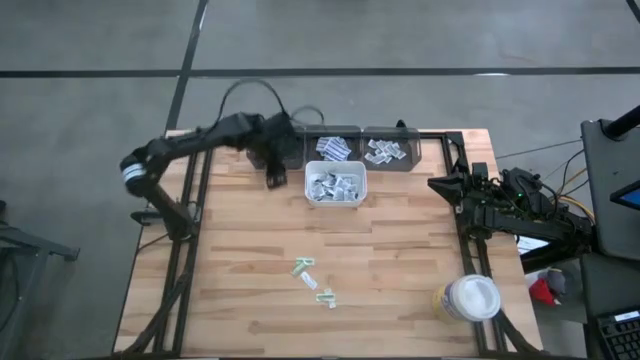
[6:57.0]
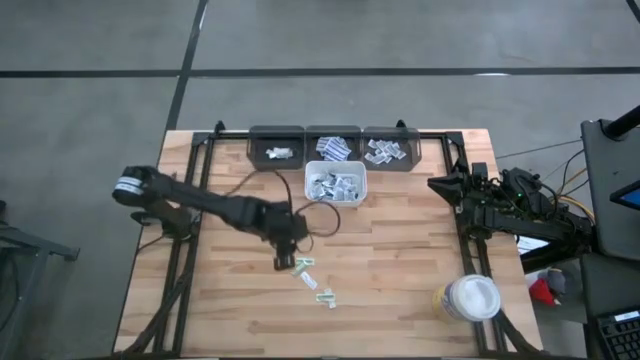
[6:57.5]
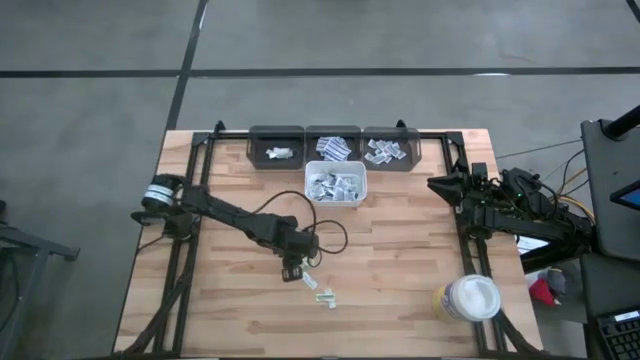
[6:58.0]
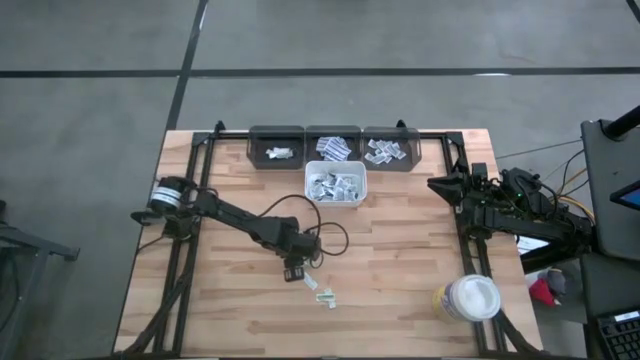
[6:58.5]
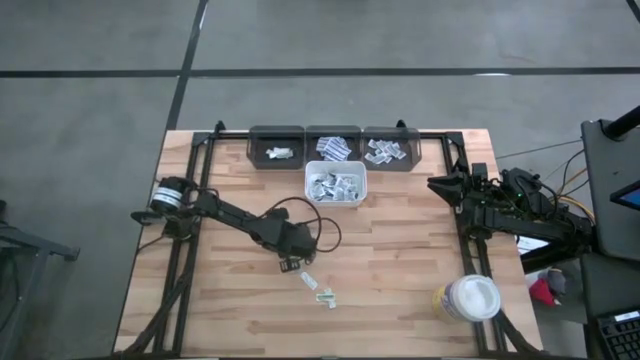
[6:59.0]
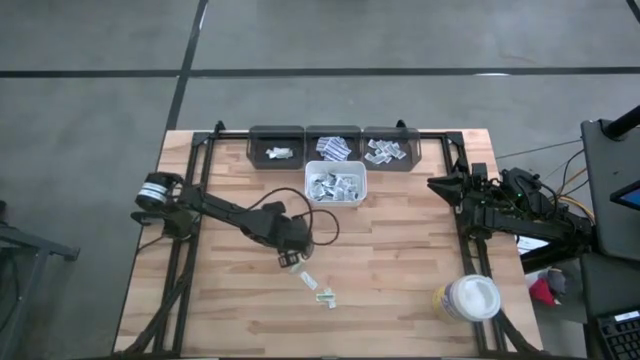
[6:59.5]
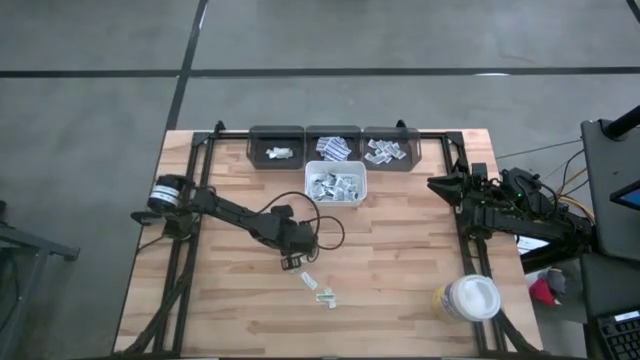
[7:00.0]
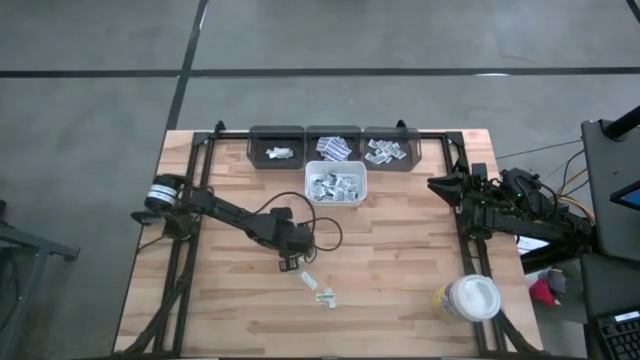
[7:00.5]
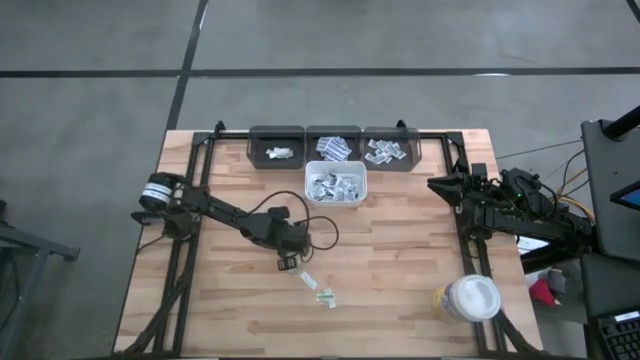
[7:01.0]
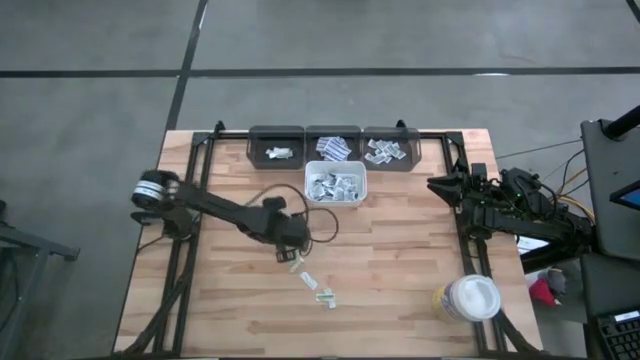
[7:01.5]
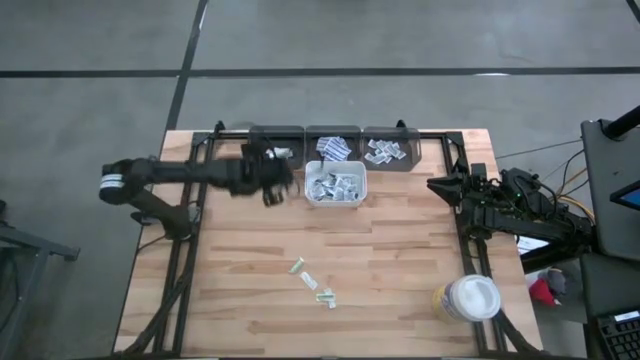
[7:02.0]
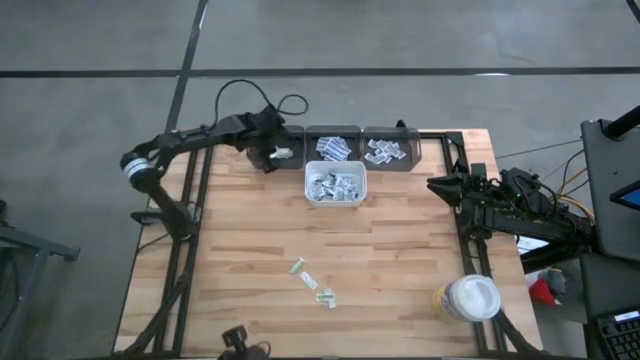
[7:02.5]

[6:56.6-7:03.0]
Task: Pick & Place First Aid Supplies
Put the green bandage into the left black bin

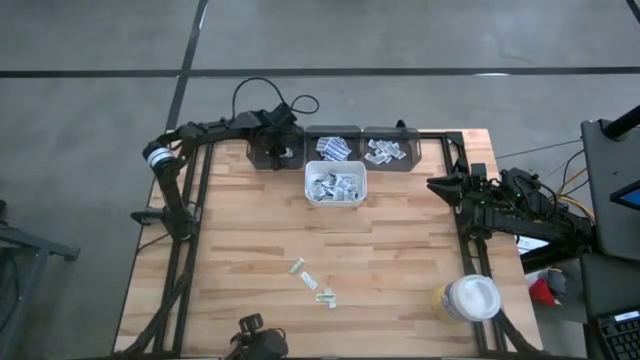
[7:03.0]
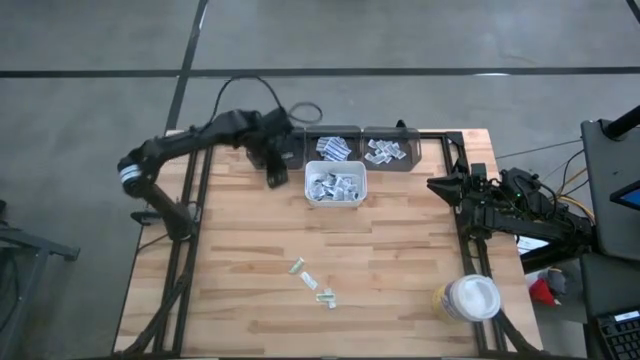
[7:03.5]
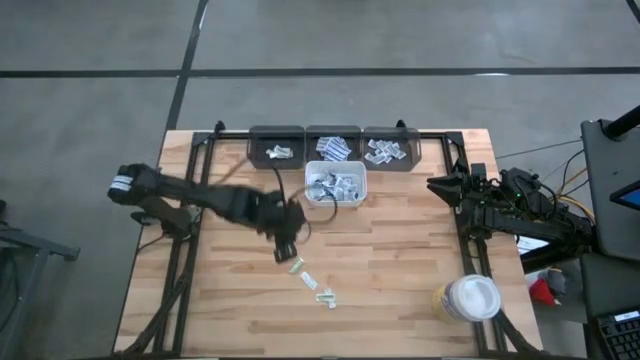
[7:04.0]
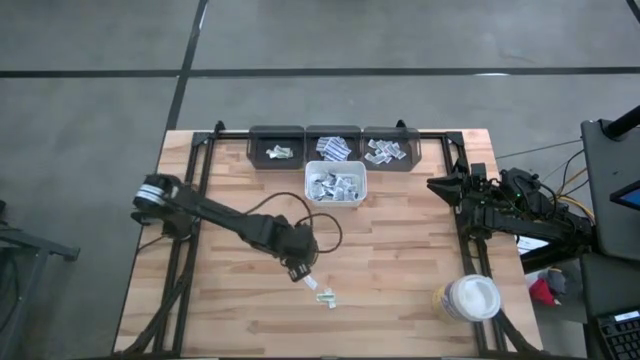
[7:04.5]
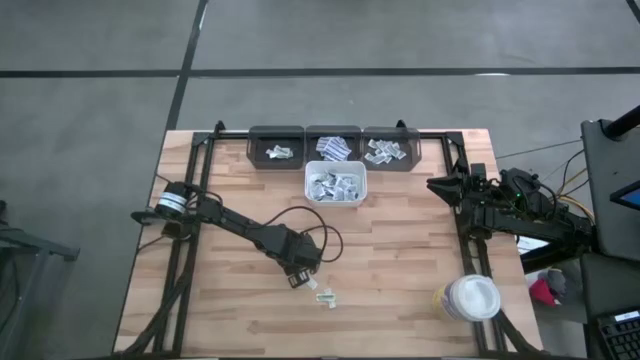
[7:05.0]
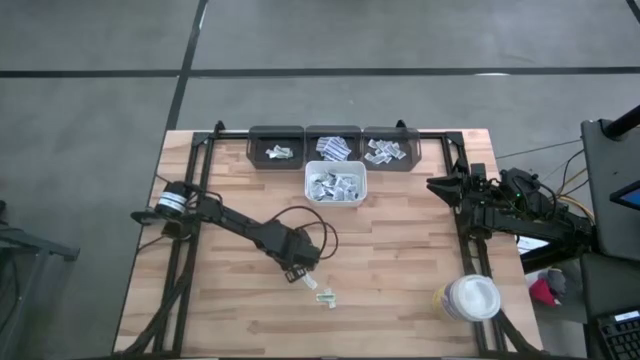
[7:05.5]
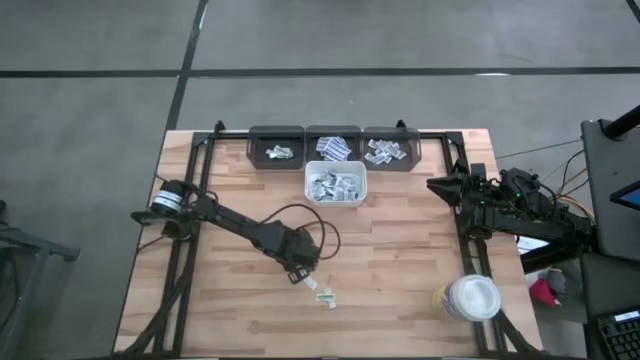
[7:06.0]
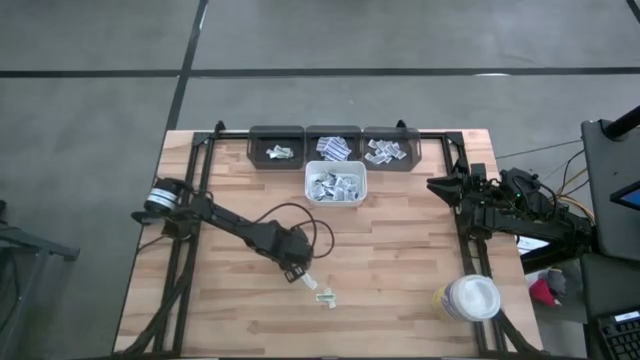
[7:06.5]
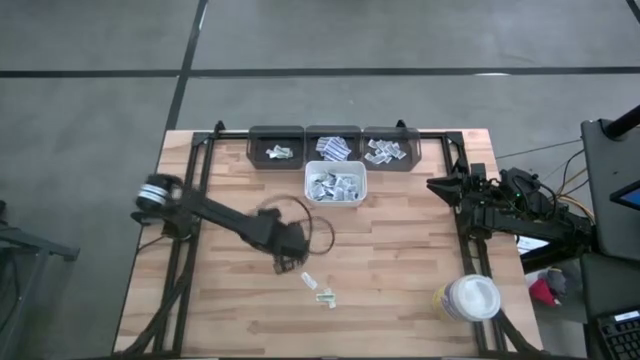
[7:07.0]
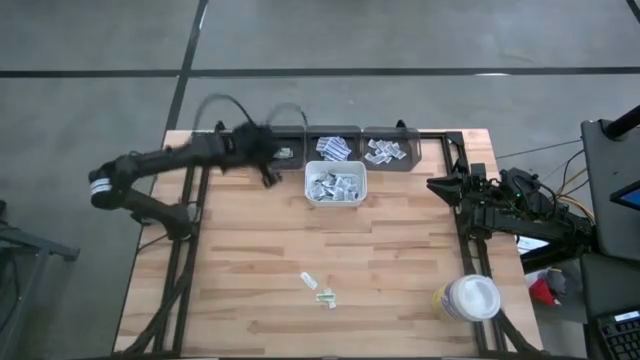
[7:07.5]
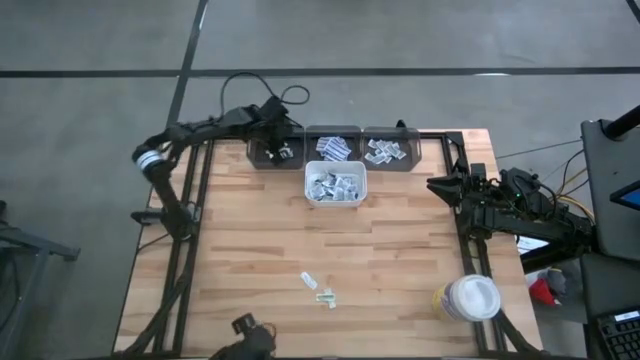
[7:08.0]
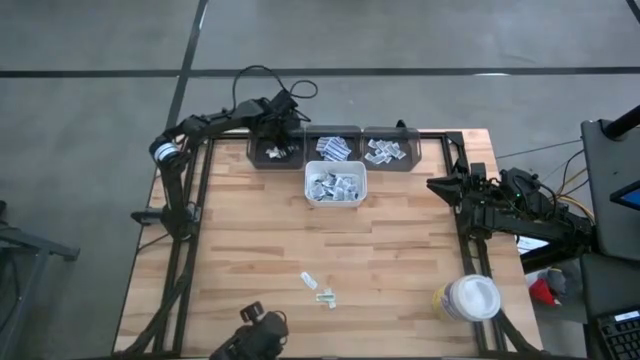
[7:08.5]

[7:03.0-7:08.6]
Put the green bandage into the left black bin

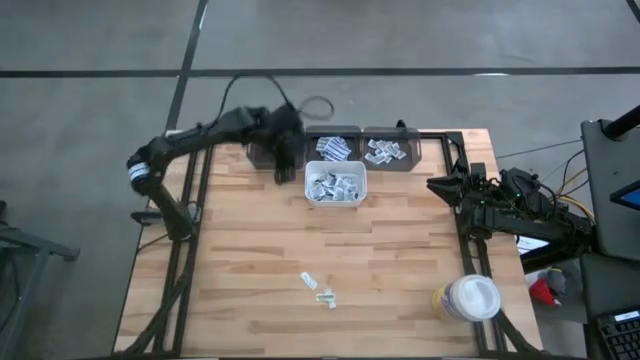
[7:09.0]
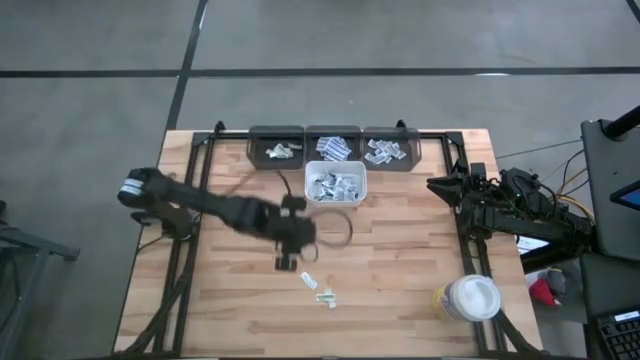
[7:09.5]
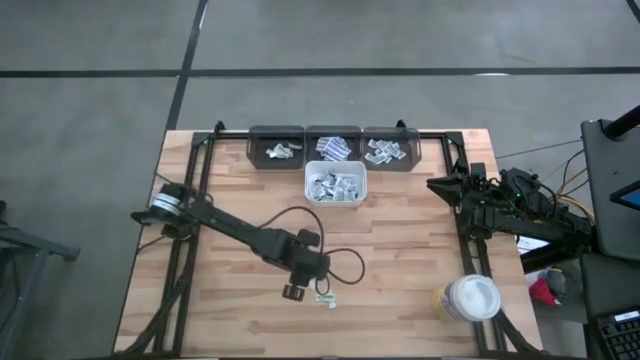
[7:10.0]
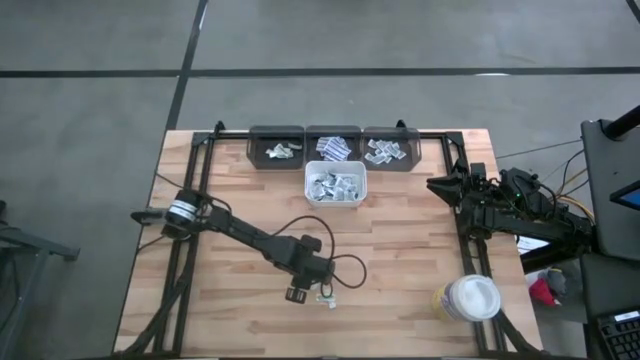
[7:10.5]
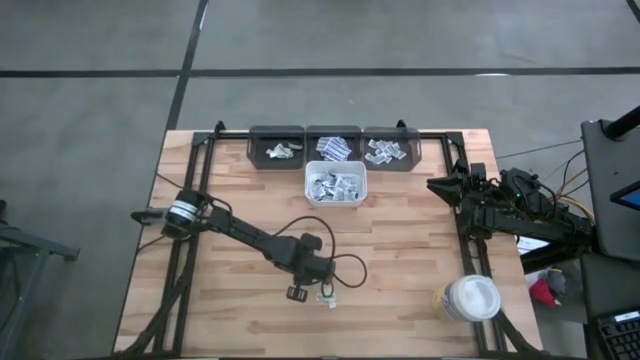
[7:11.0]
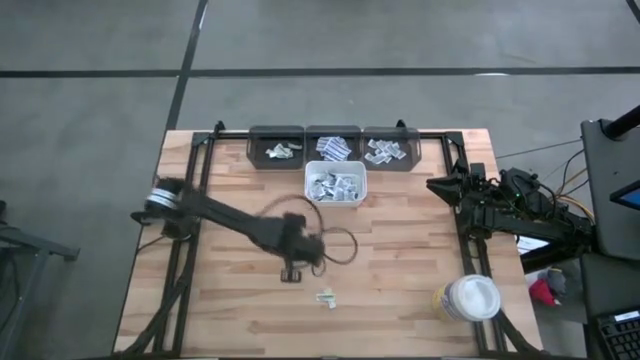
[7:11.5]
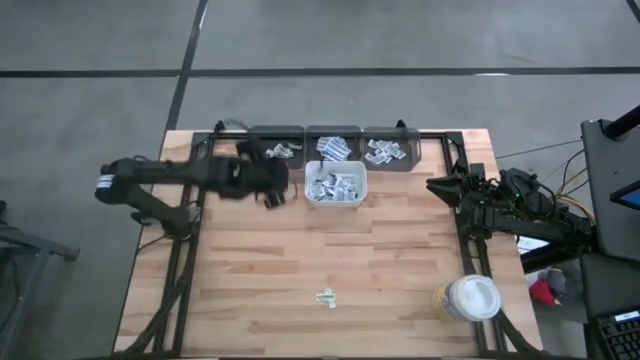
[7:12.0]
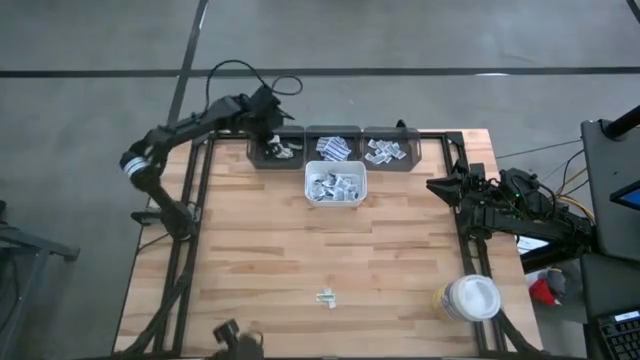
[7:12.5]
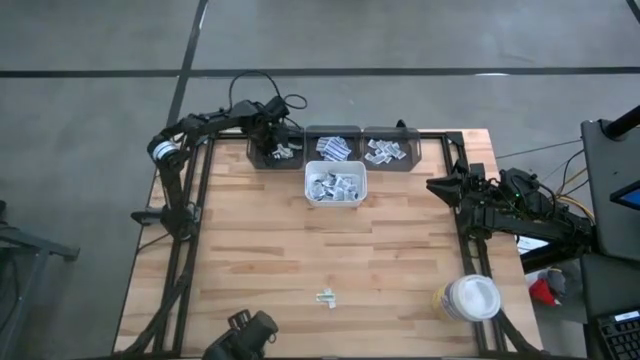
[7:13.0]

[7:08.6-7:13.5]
Put the green bandage into the left black bin

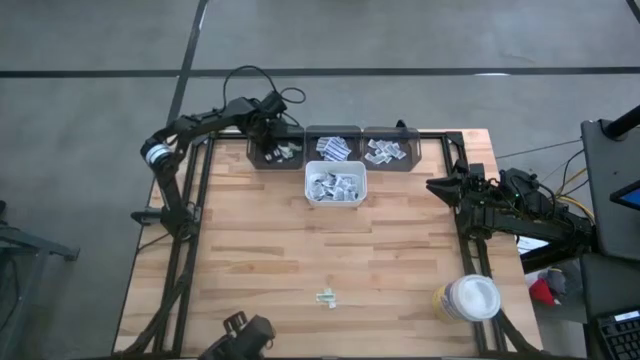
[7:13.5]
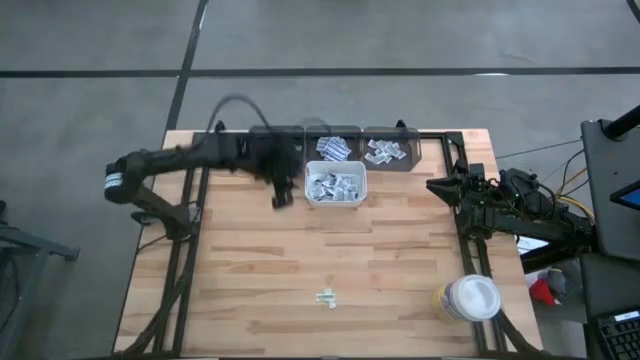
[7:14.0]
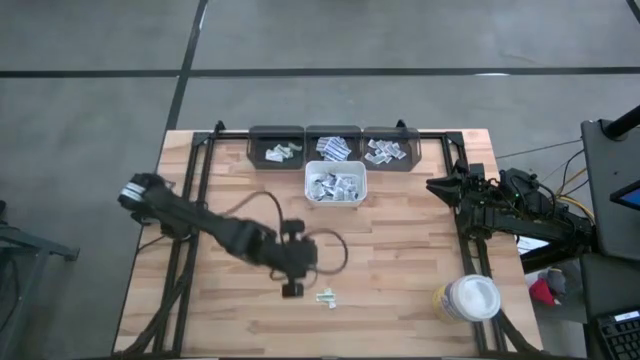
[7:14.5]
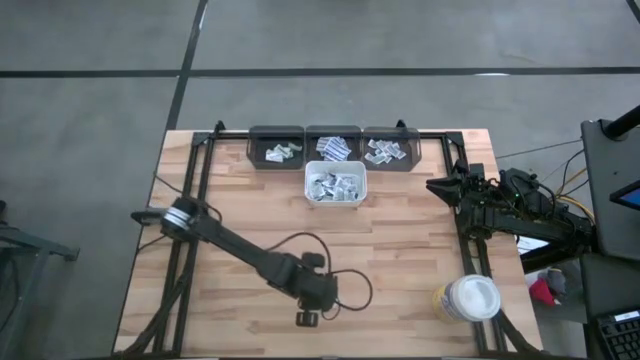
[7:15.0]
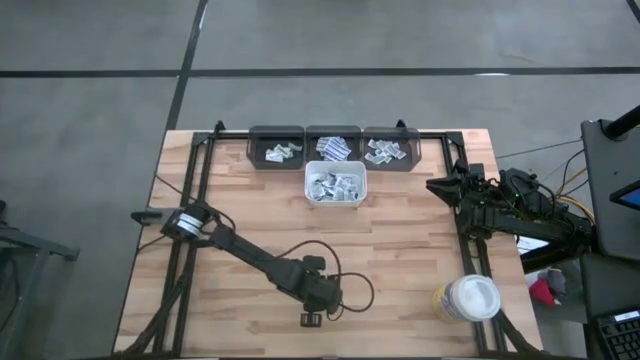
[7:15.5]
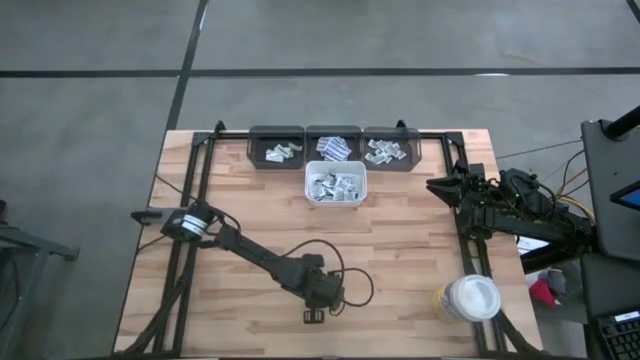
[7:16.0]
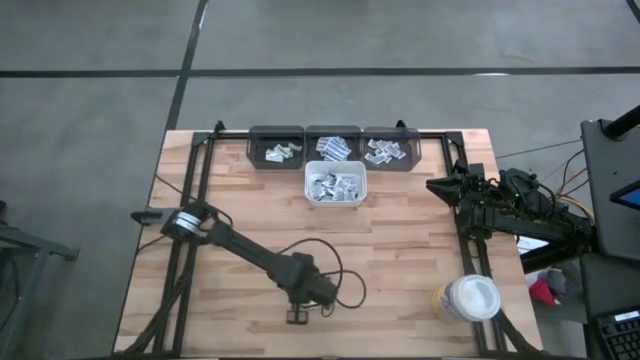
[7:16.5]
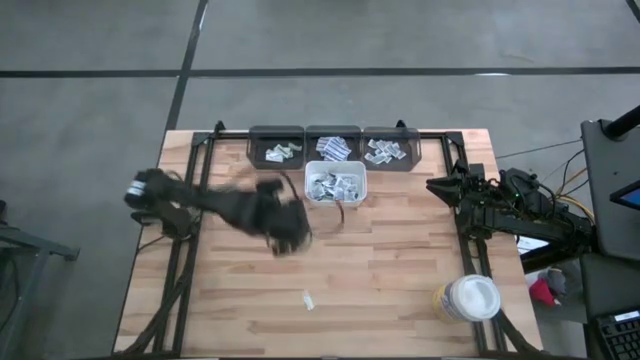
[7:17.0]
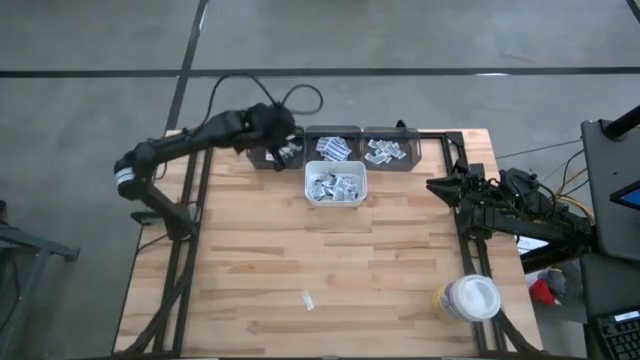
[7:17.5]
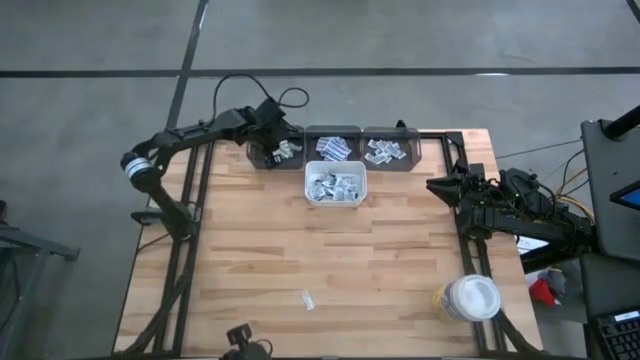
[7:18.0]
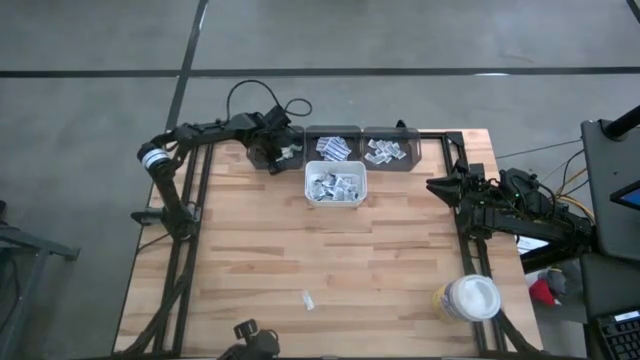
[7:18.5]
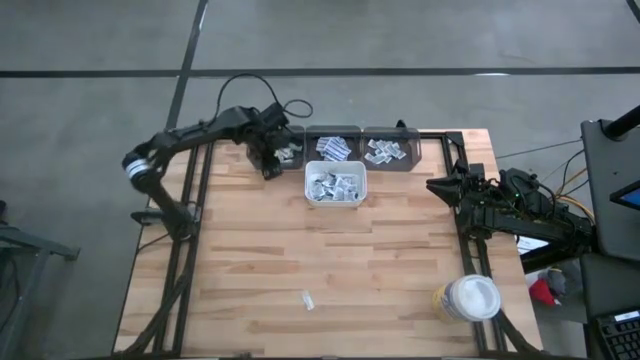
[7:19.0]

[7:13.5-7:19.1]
Put the green bandage into the left black bin
